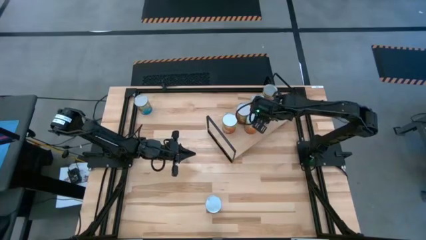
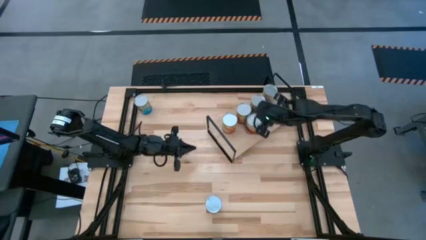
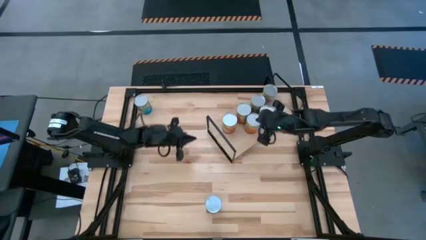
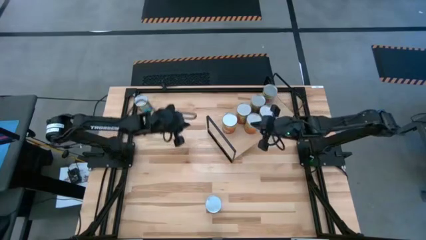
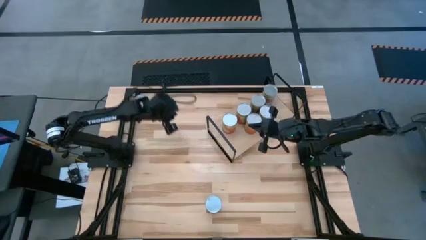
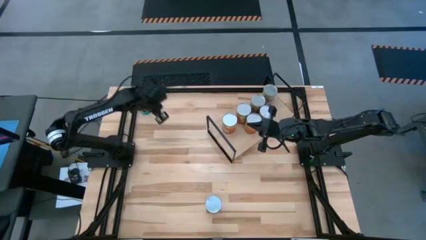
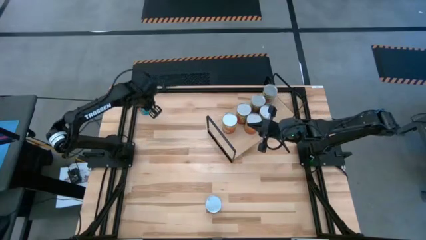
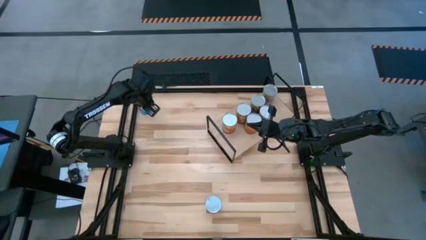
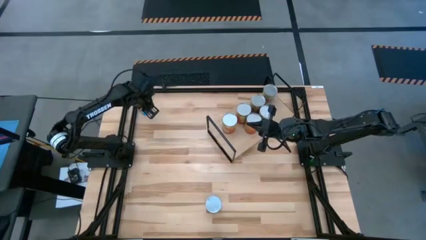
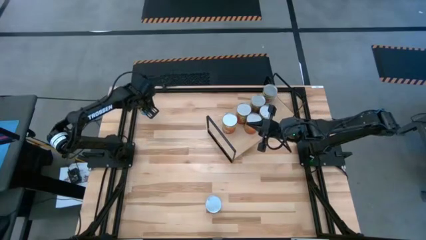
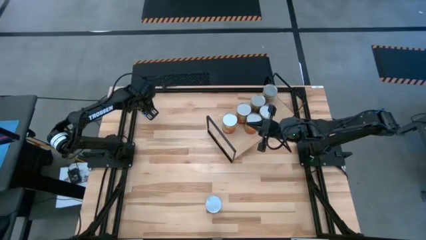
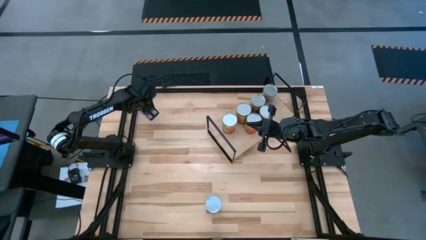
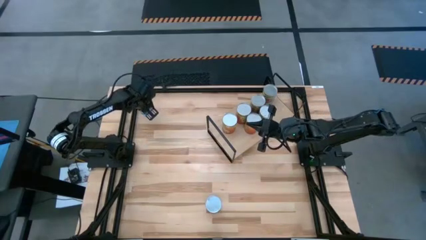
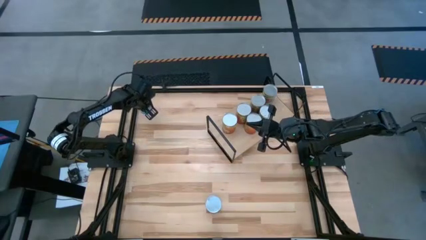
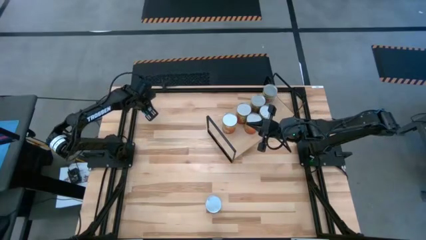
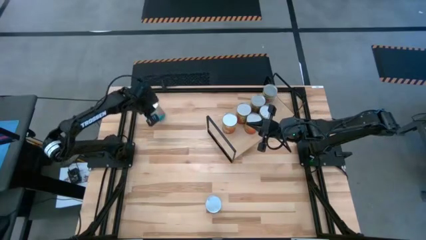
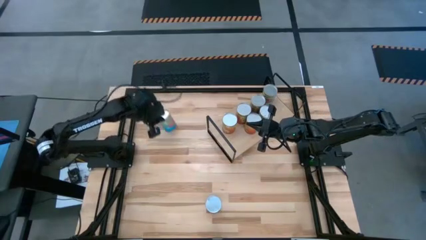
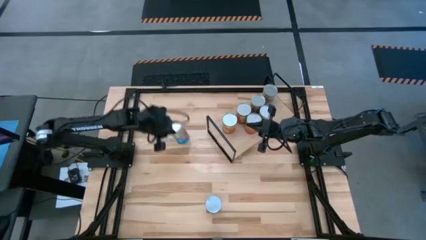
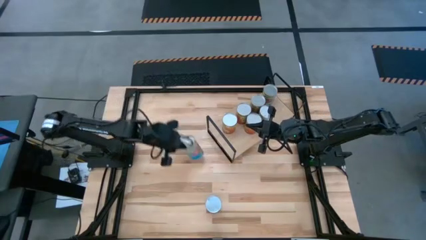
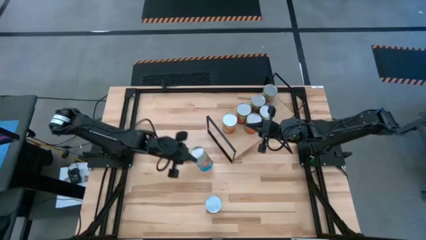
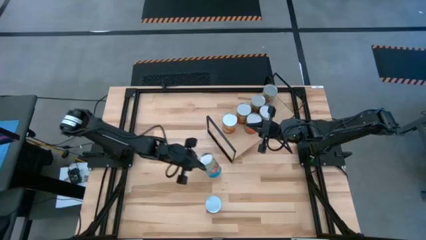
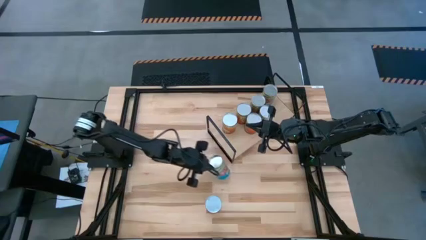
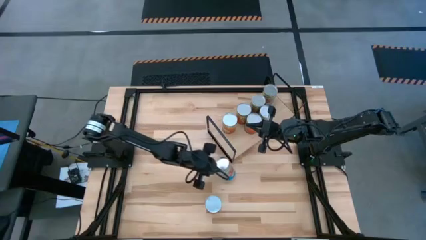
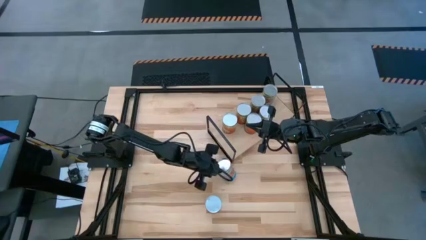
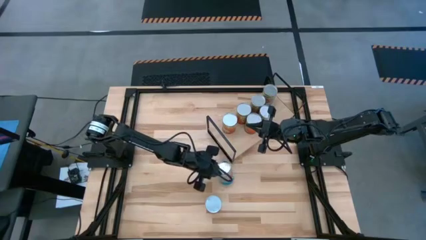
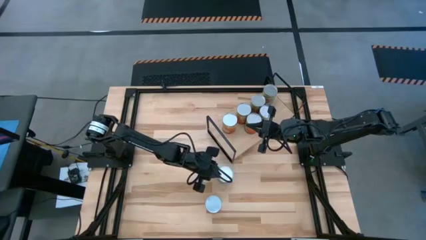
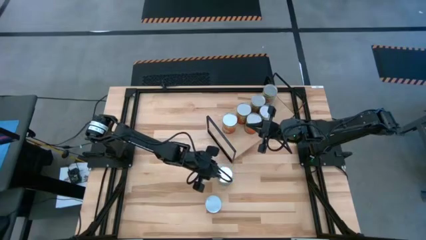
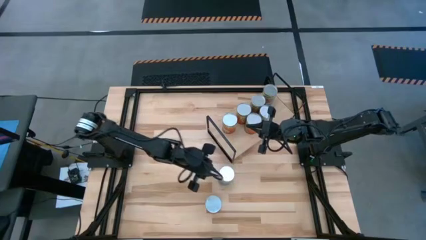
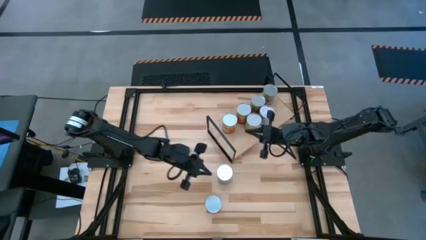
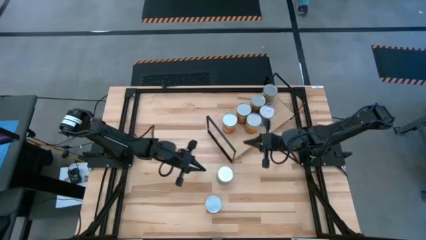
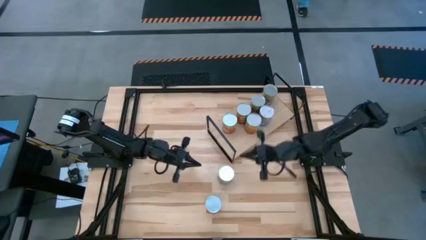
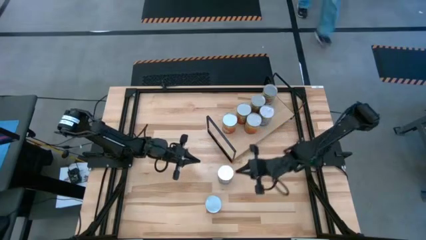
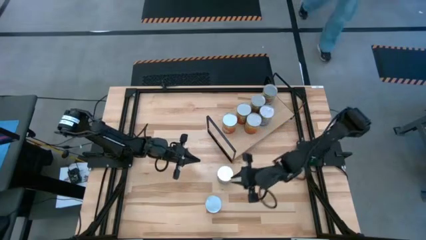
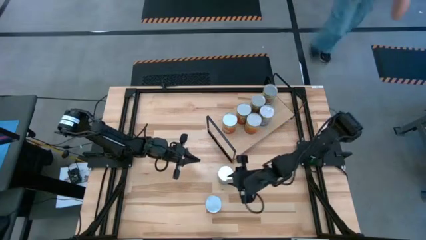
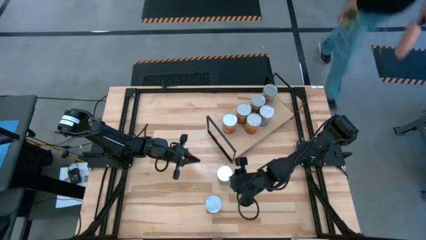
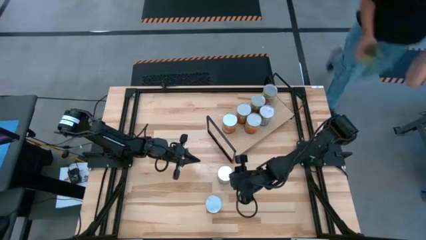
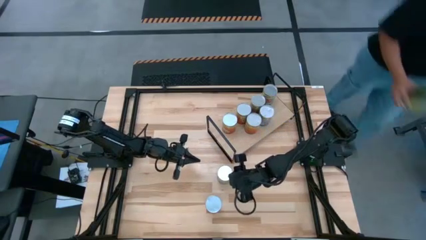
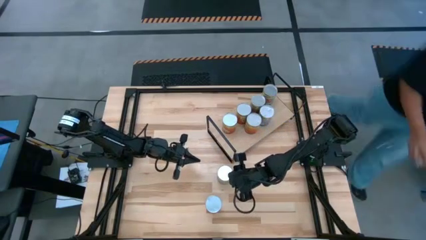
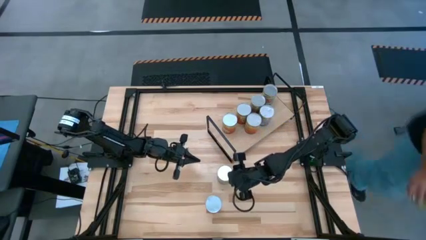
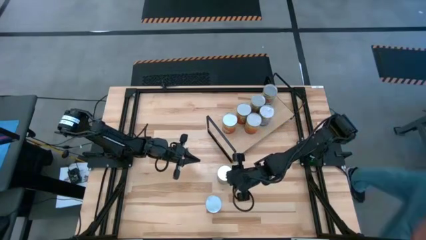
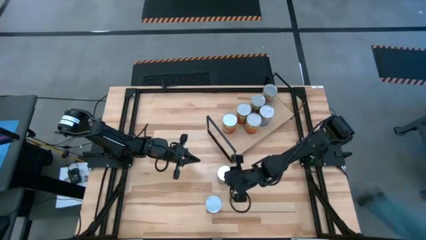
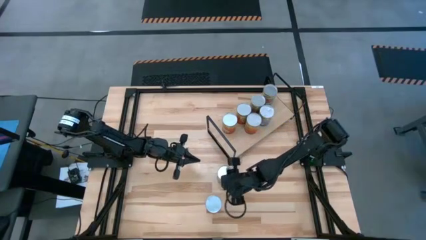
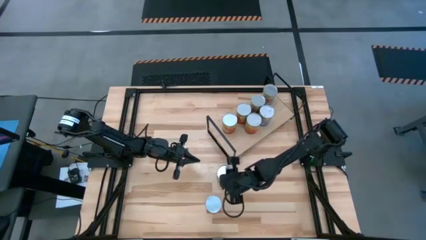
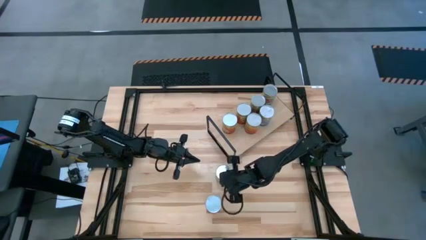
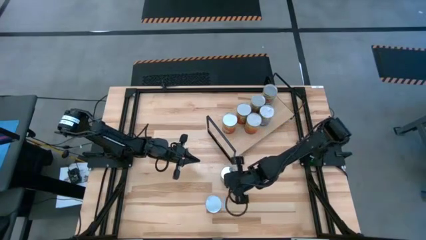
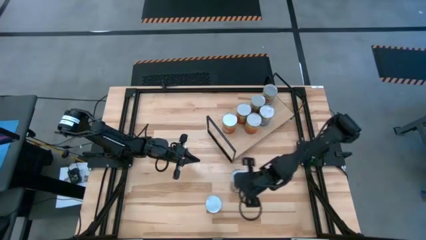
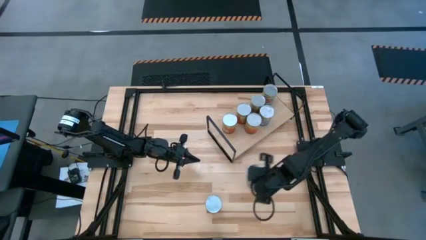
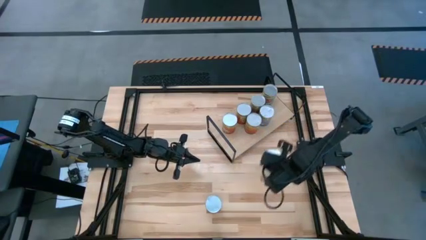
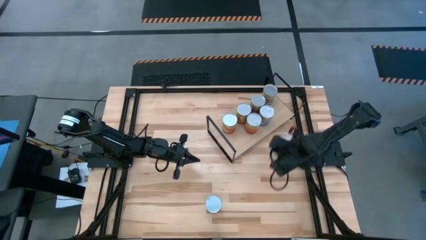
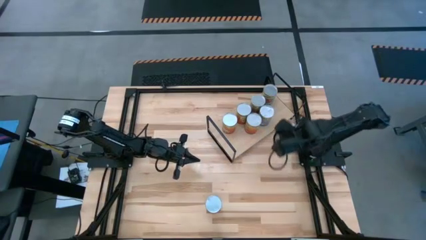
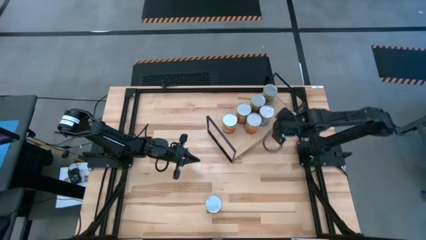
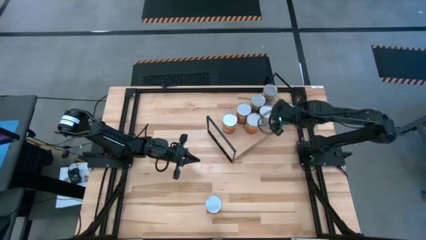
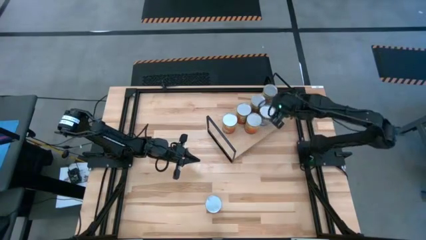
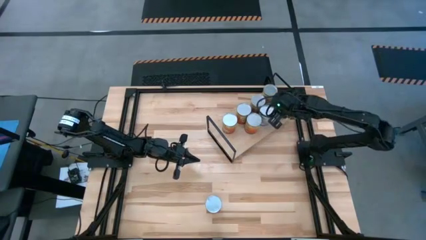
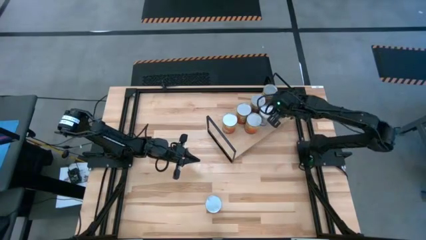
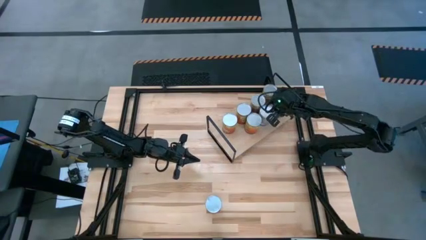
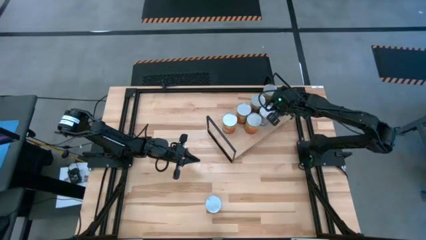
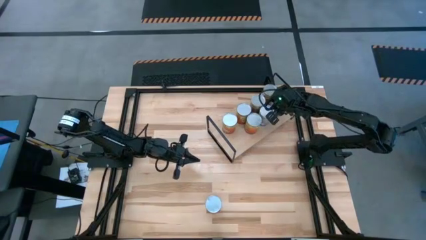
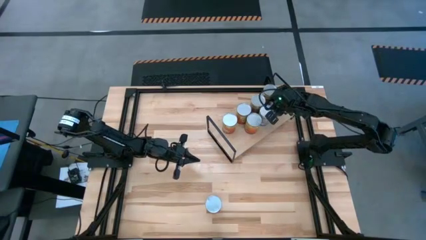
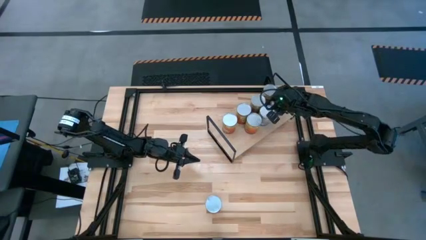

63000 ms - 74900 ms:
Task: Pick and place cans onto a shelf
Put the canned tomatoes on the shelf aligned with the other canned tomatoes

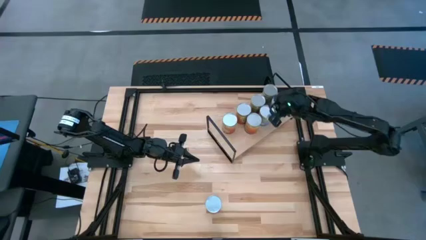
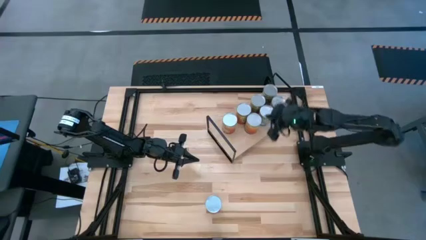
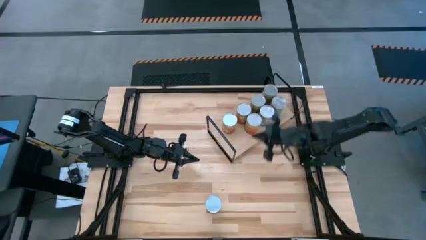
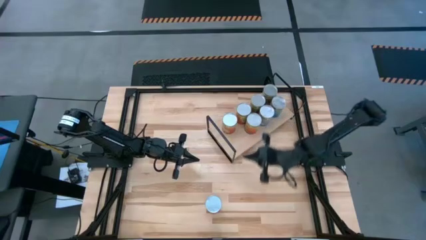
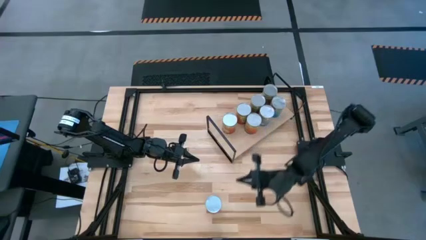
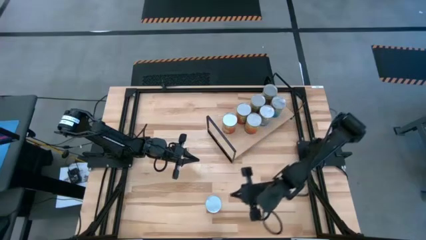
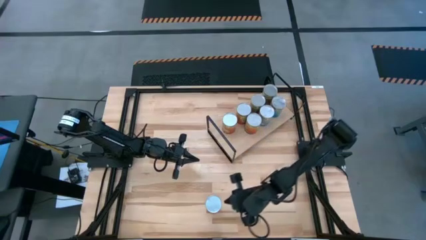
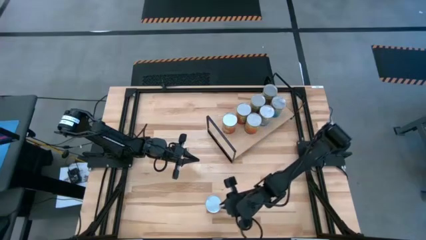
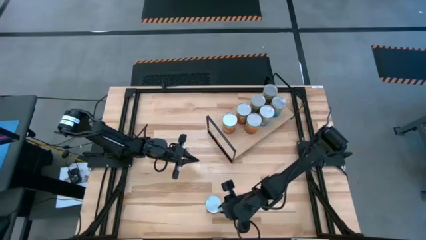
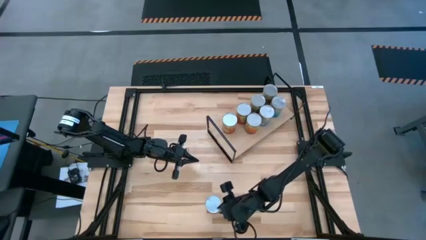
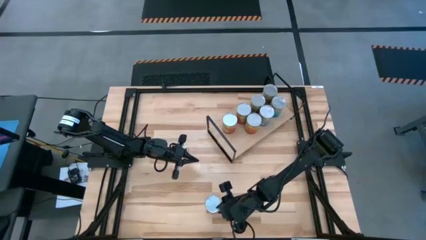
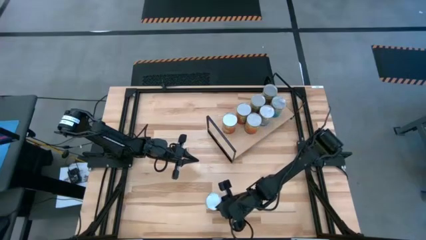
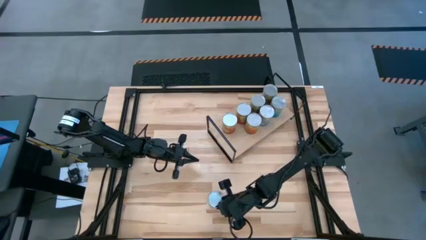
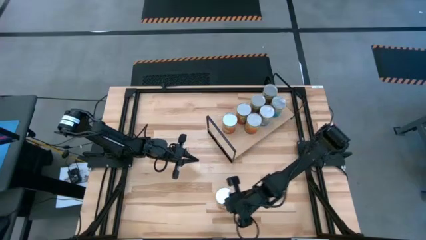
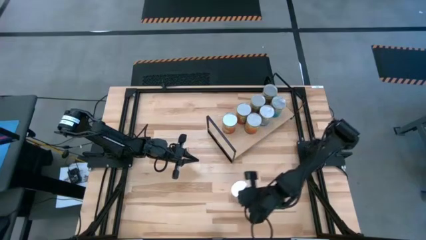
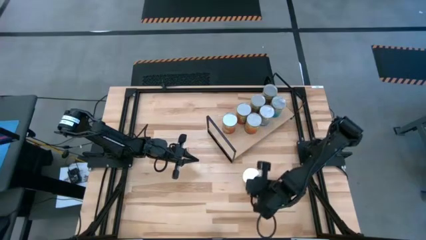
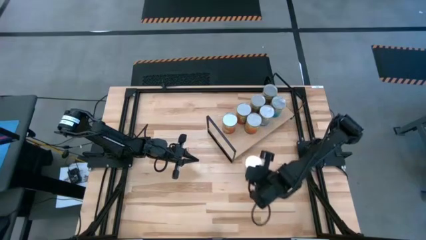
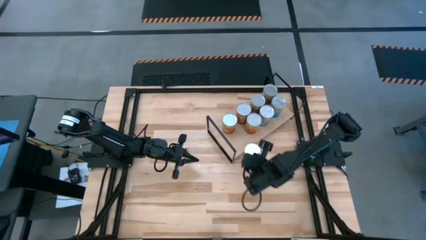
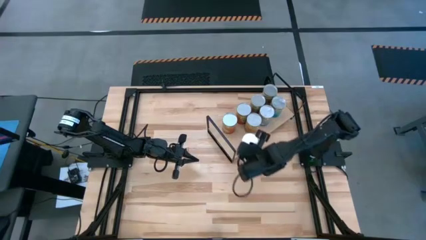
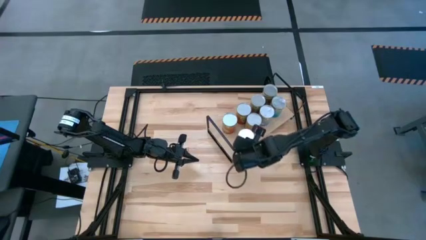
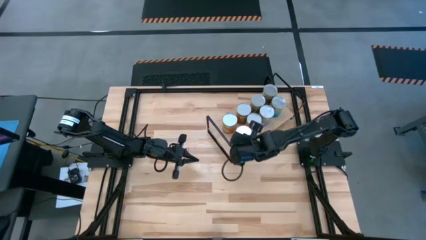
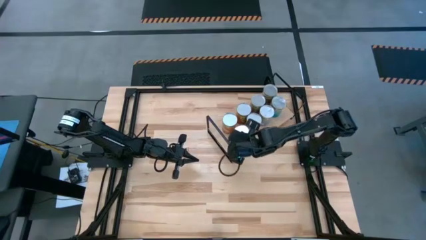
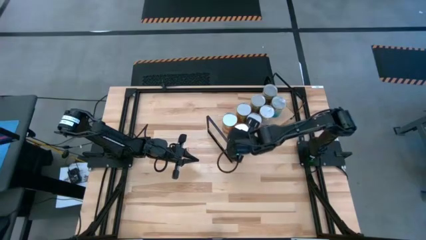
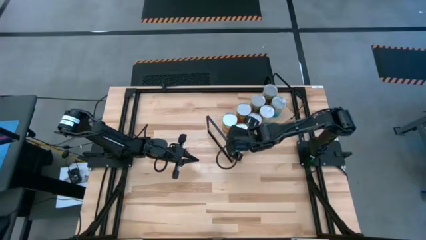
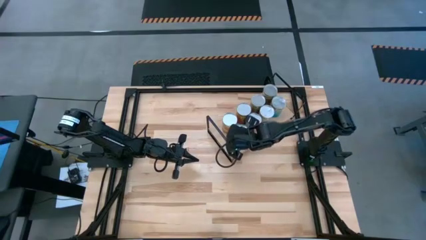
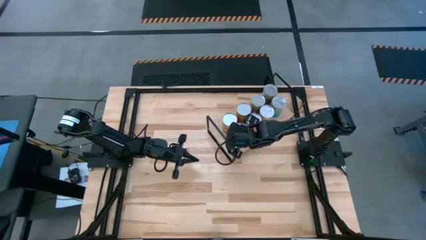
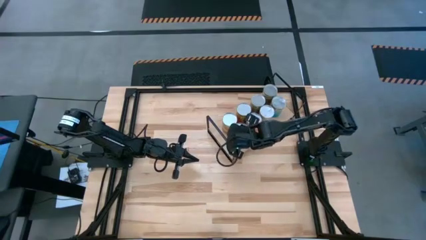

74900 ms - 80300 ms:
Put the canned corn on the shelf aligned with the other canned corn
